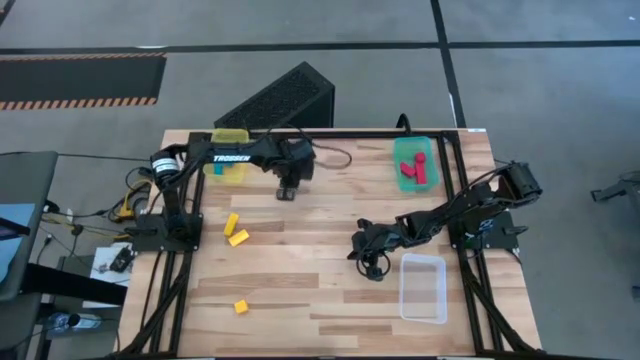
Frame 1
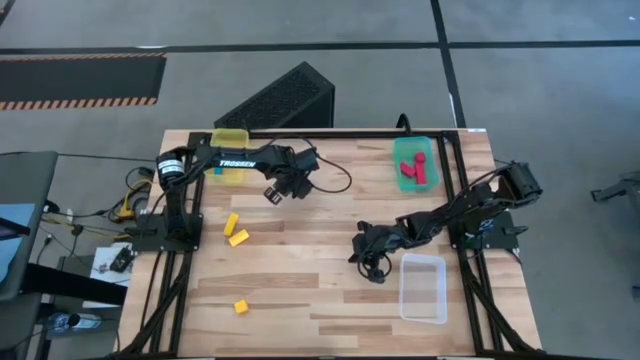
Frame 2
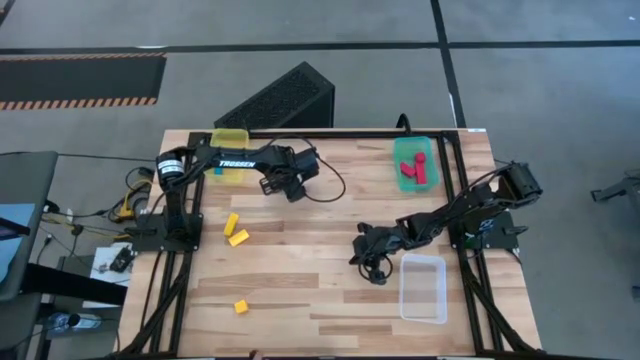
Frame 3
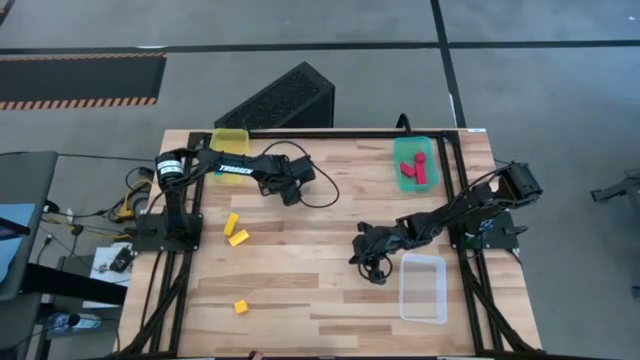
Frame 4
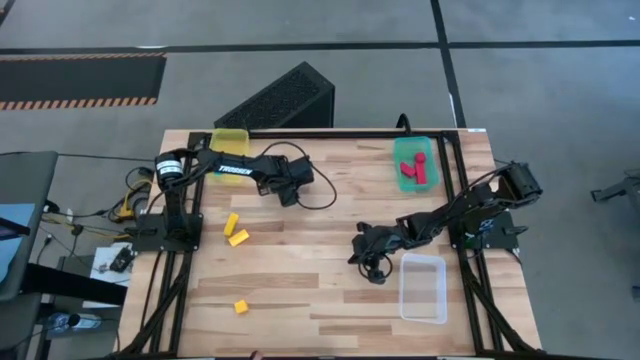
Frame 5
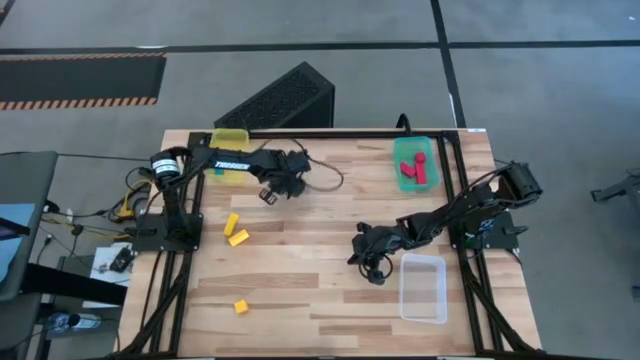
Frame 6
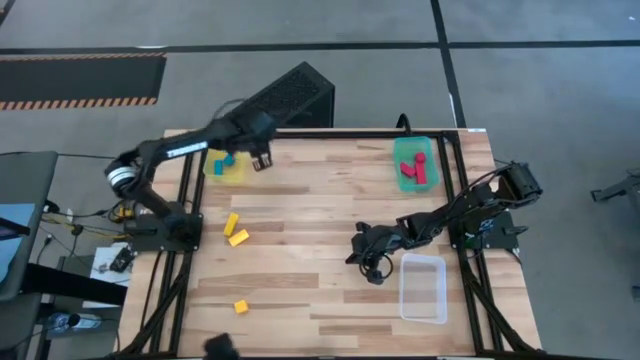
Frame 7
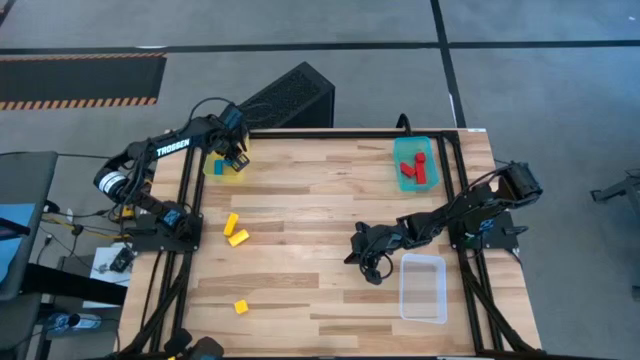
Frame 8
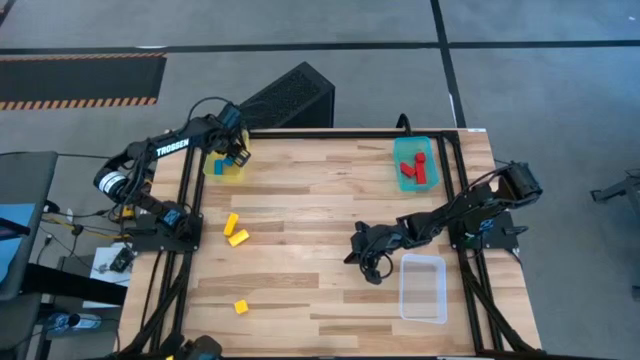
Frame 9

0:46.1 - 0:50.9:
Task: Sort & place blocks by color
Put the blue block into the yellow bin

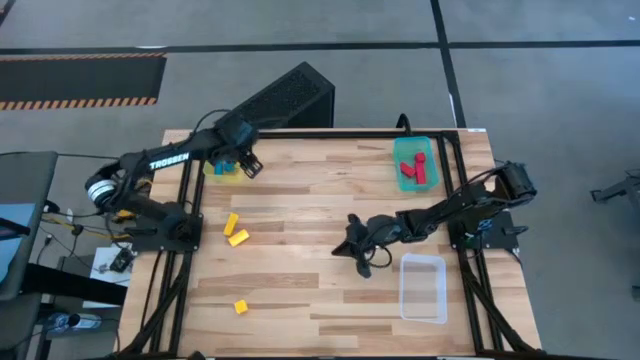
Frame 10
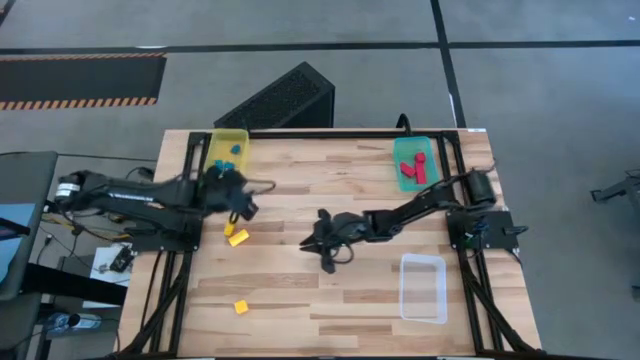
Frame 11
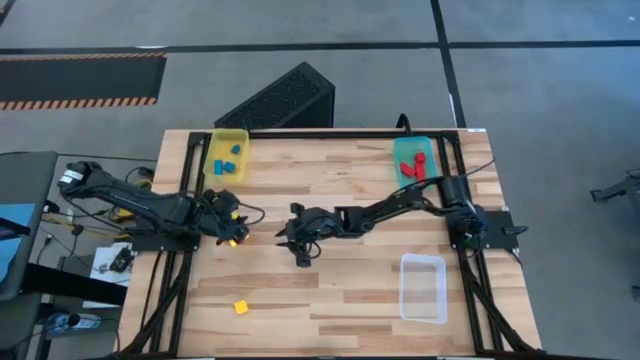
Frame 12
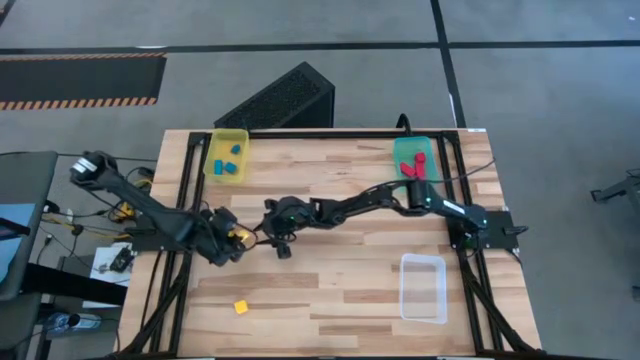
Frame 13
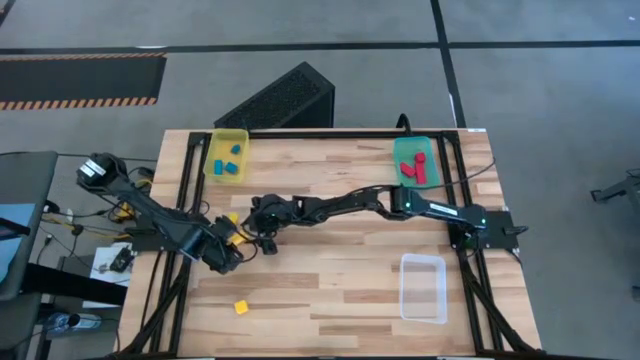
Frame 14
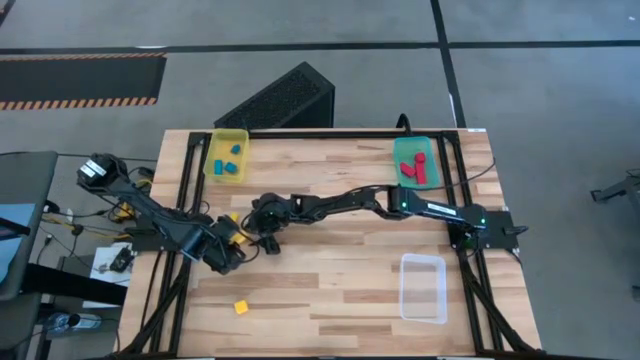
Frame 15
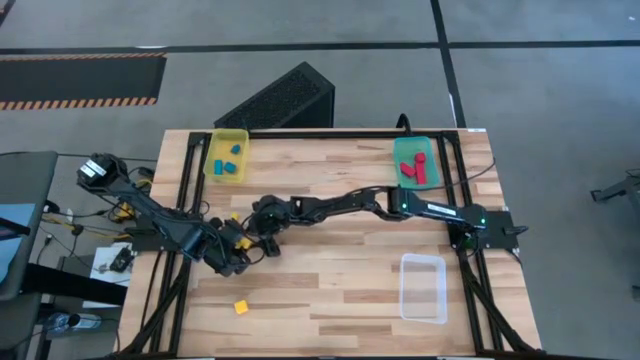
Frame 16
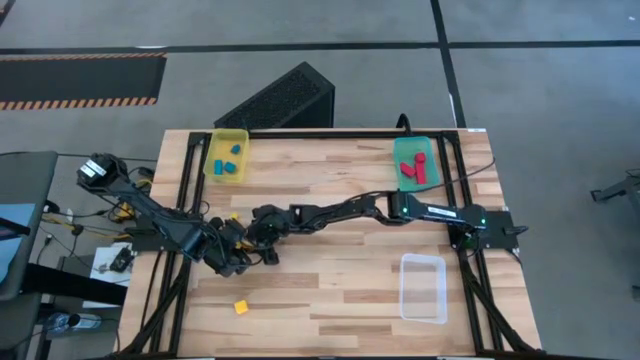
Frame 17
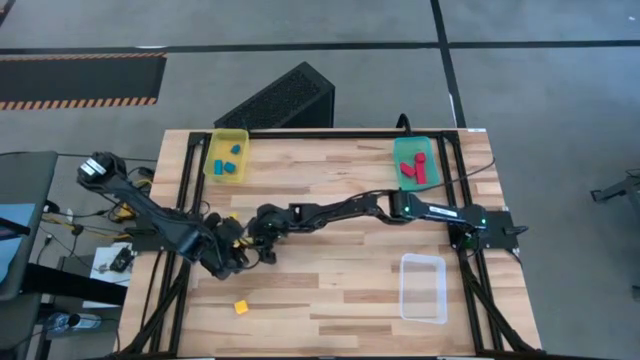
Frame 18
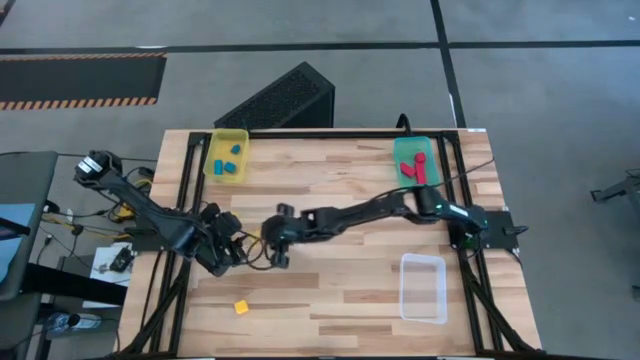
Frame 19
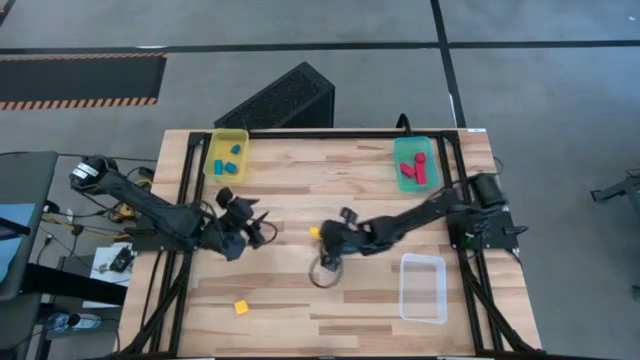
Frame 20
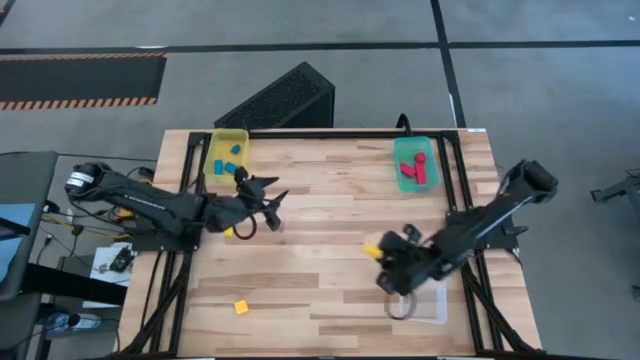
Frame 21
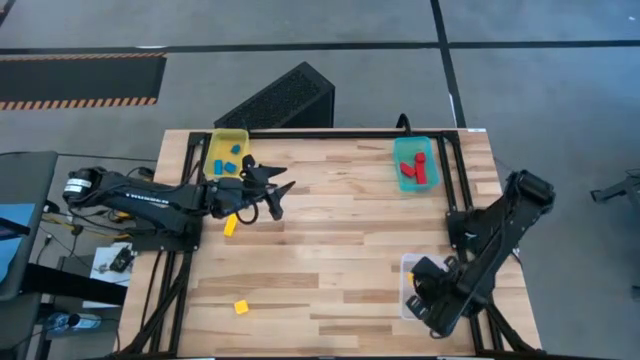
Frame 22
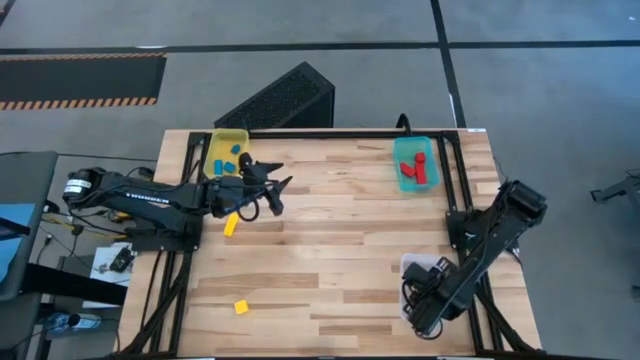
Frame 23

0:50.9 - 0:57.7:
Put the middle yellow block into the white bin

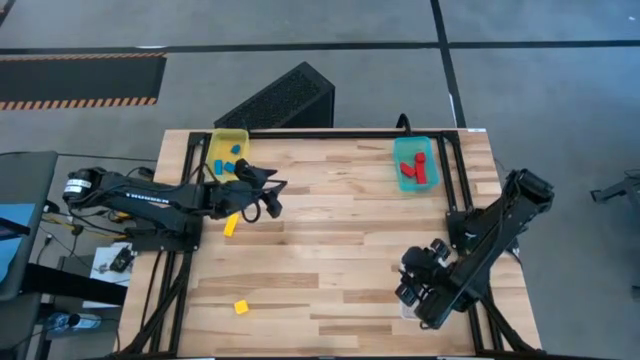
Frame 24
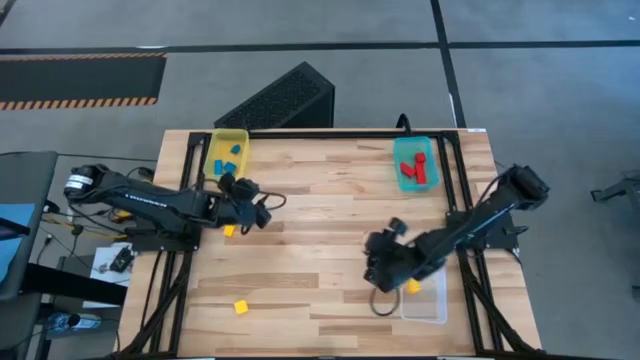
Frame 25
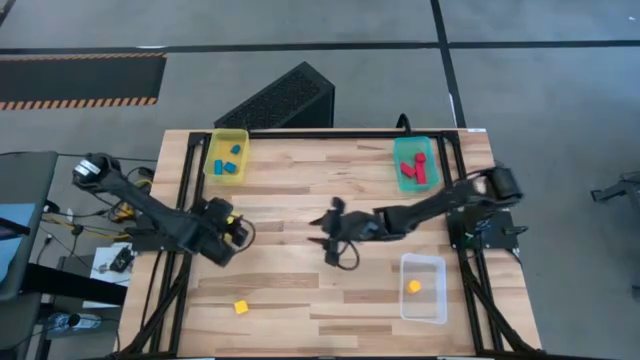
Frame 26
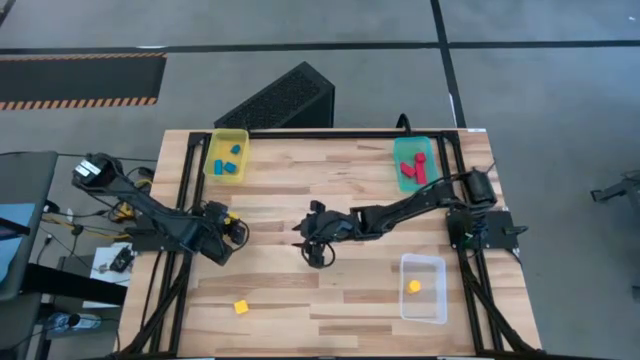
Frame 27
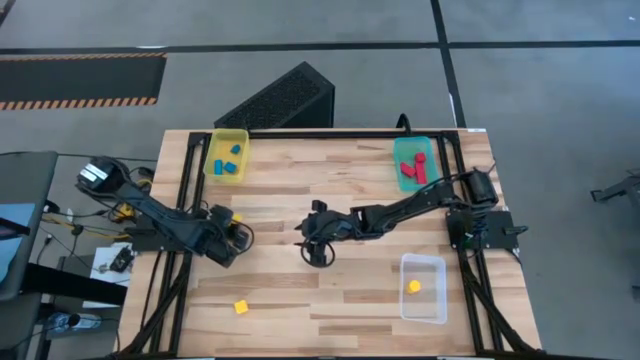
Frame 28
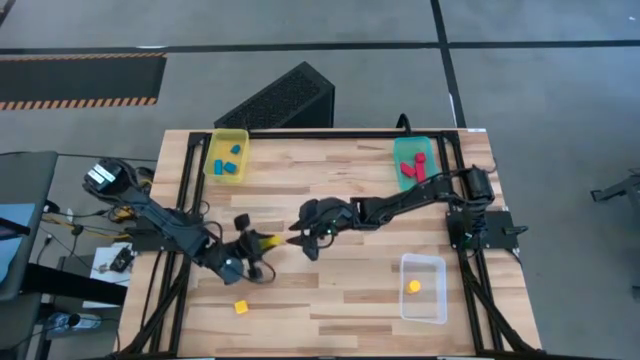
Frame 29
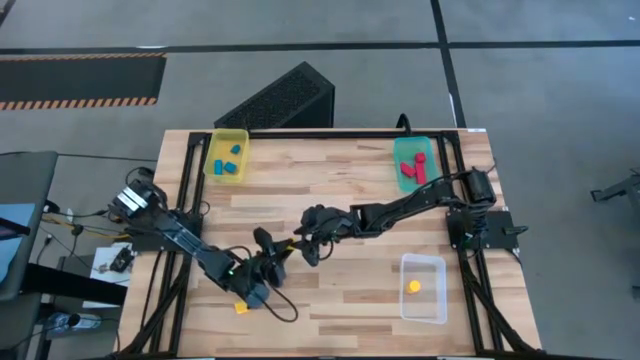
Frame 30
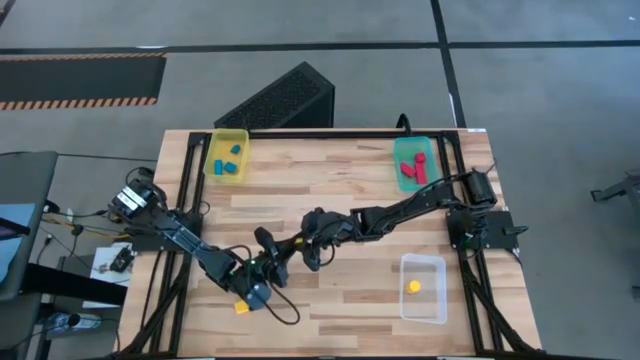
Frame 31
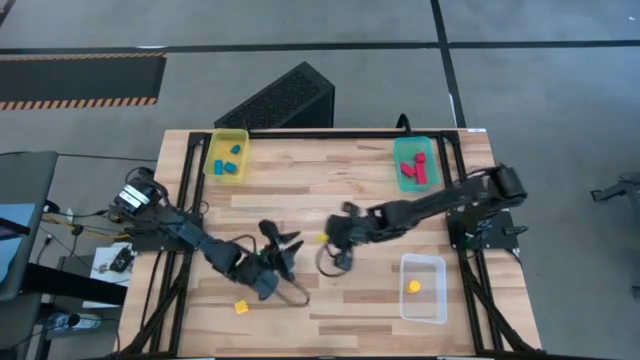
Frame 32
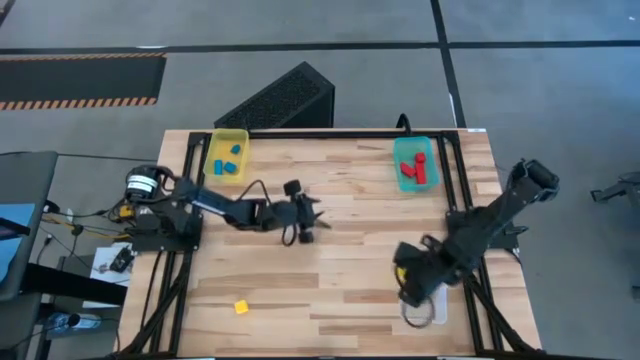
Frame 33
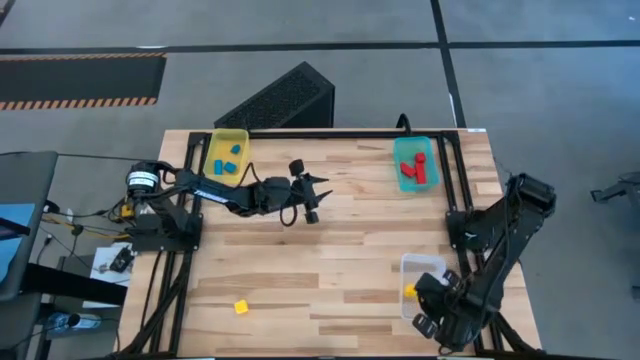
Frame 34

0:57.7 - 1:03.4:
Put the top yellow block into the white bin

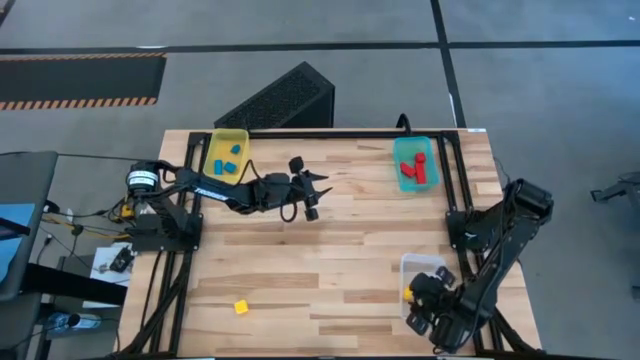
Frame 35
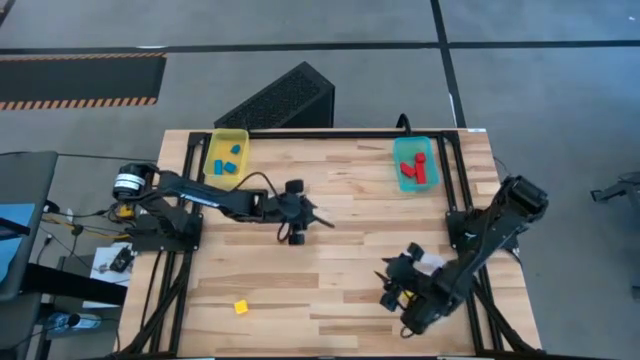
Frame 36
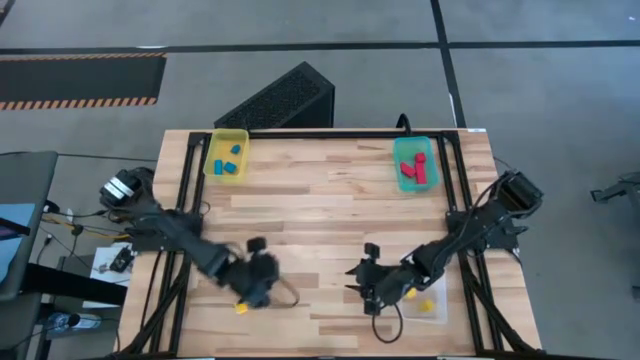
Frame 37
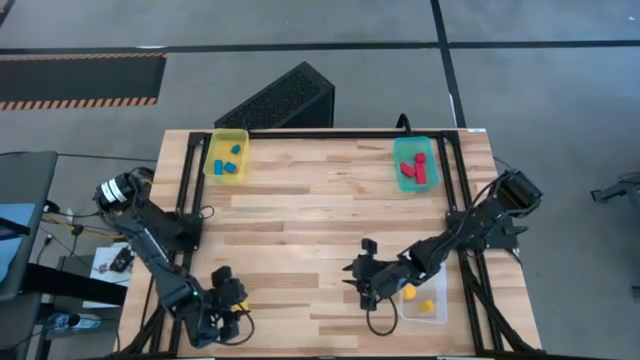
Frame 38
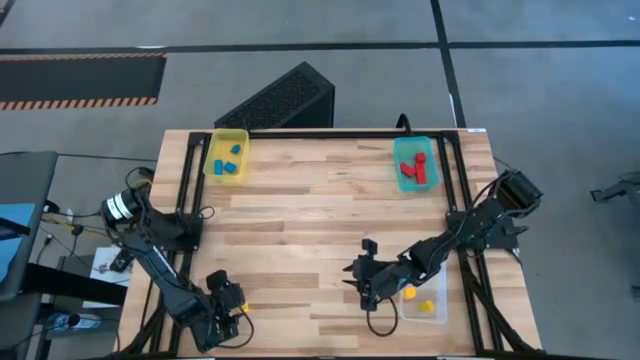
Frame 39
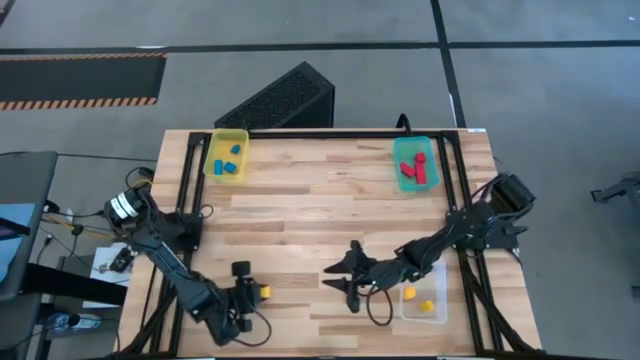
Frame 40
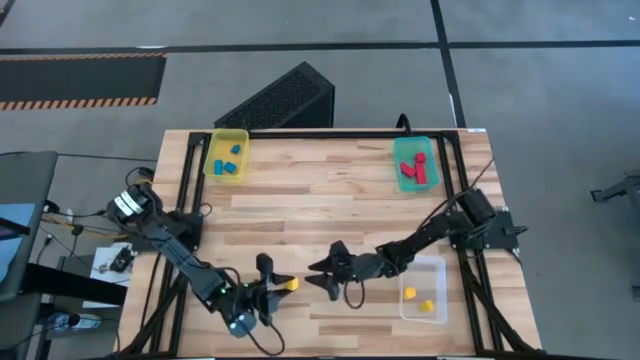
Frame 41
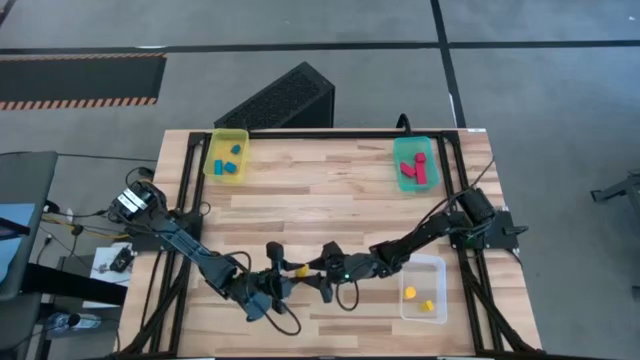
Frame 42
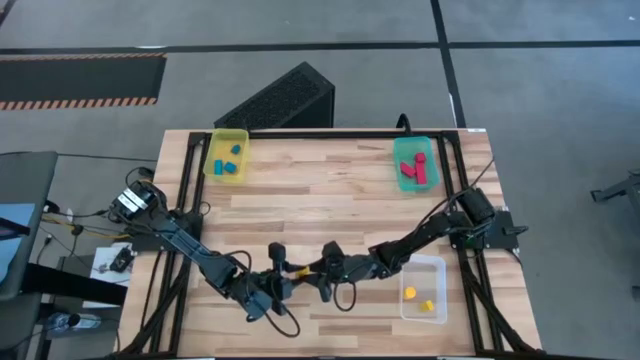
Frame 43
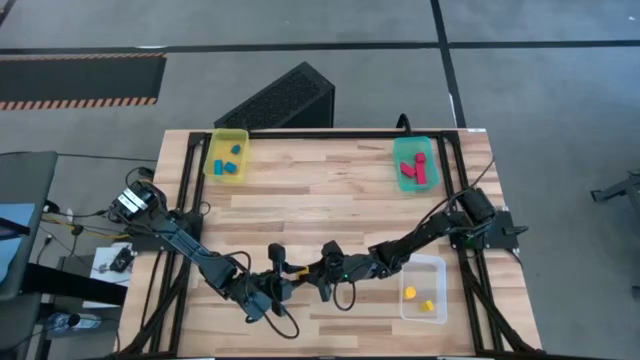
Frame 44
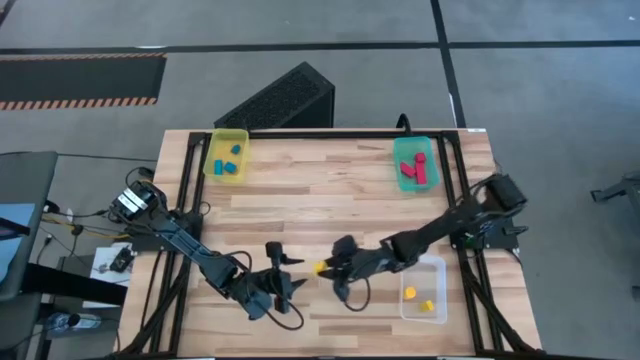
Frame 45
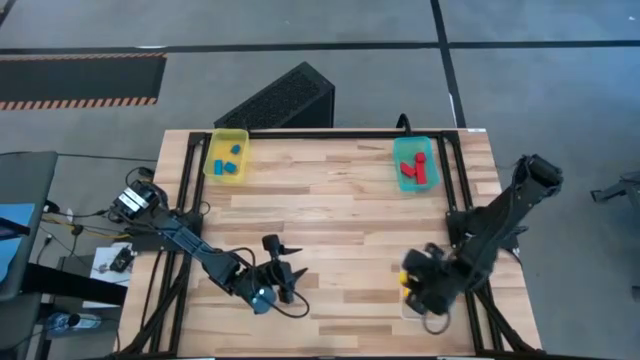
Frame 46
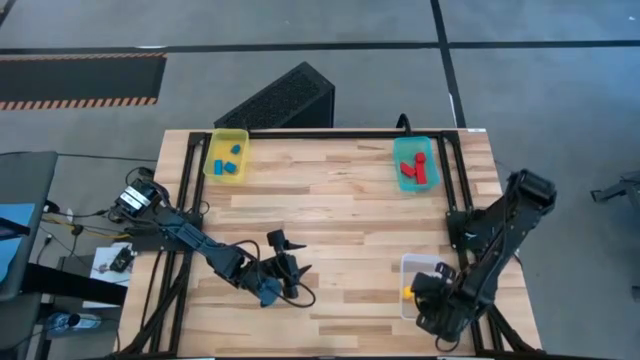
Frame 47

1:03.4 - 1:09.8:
Put the yellow block into the white bin
